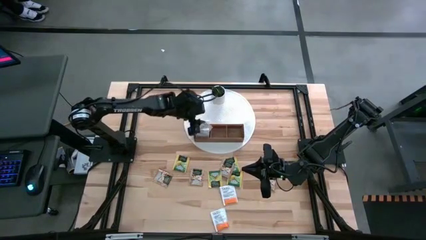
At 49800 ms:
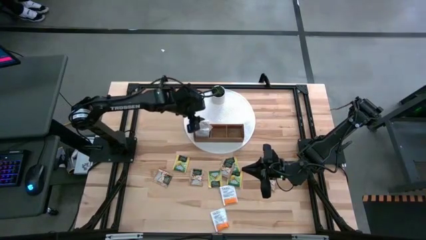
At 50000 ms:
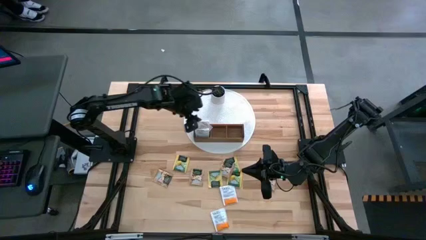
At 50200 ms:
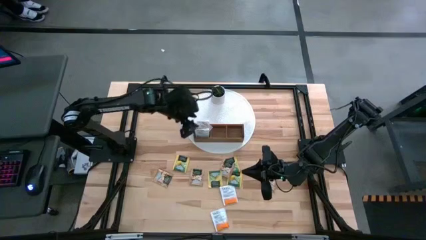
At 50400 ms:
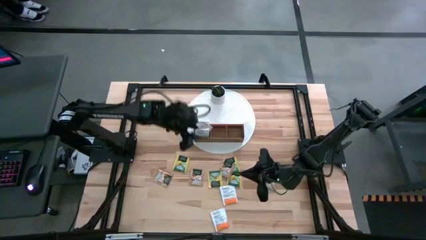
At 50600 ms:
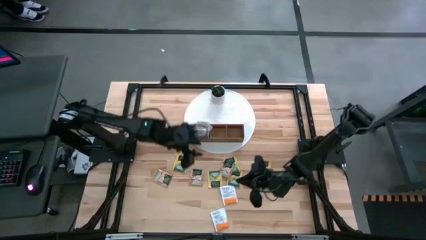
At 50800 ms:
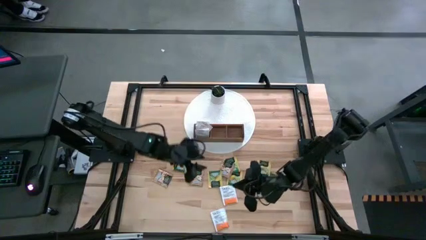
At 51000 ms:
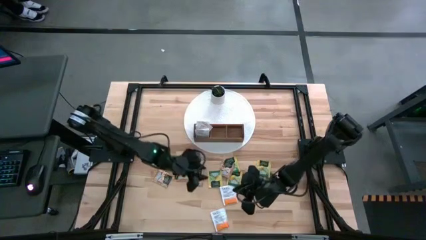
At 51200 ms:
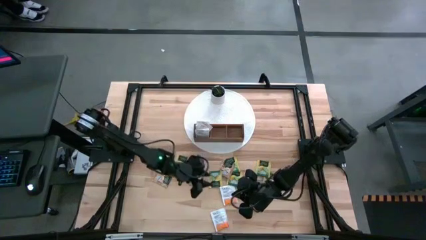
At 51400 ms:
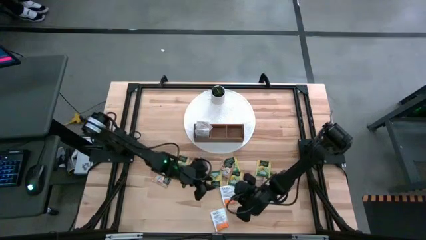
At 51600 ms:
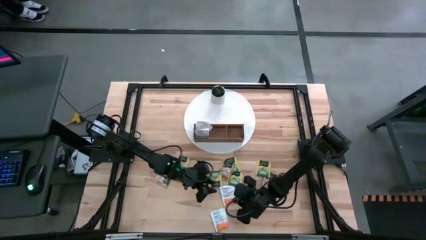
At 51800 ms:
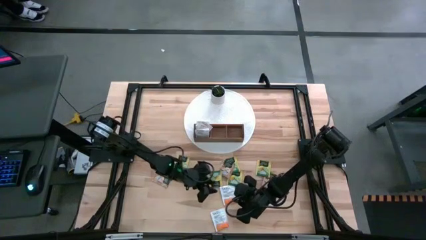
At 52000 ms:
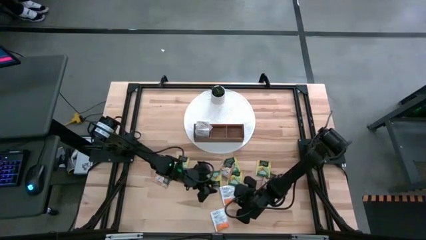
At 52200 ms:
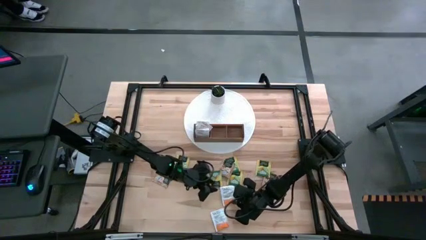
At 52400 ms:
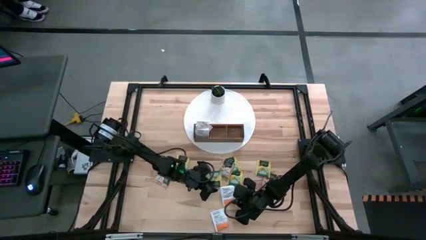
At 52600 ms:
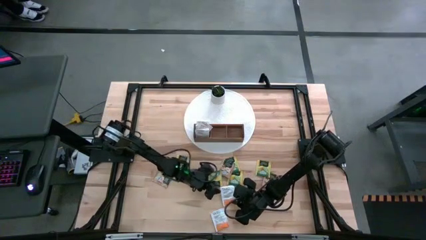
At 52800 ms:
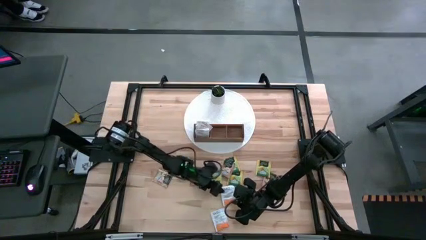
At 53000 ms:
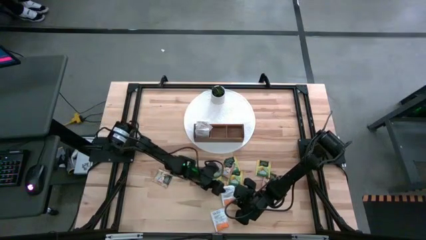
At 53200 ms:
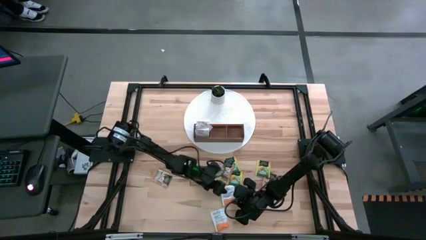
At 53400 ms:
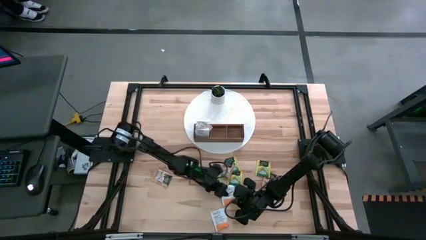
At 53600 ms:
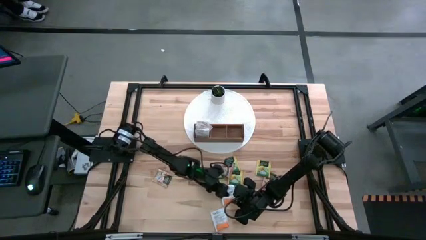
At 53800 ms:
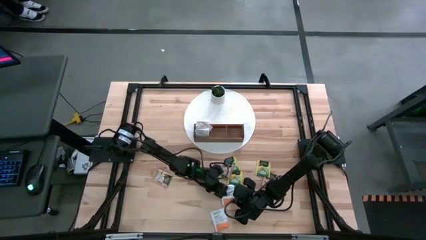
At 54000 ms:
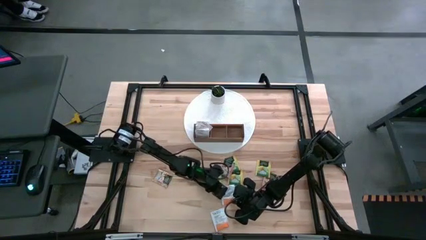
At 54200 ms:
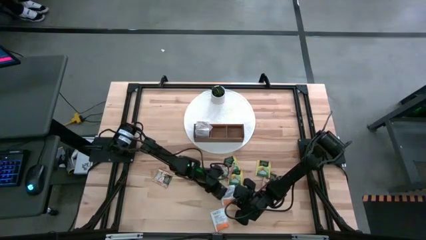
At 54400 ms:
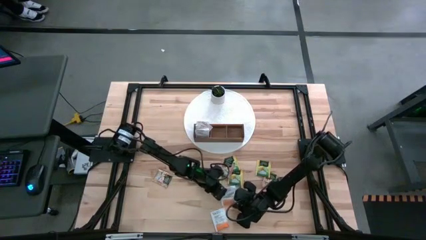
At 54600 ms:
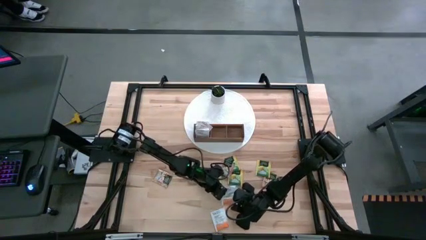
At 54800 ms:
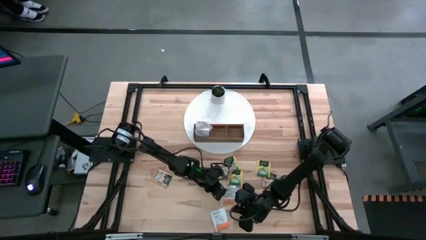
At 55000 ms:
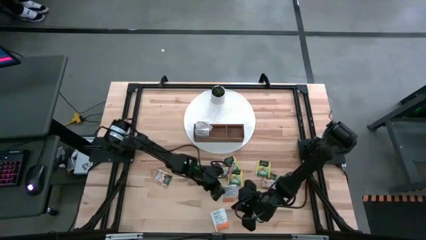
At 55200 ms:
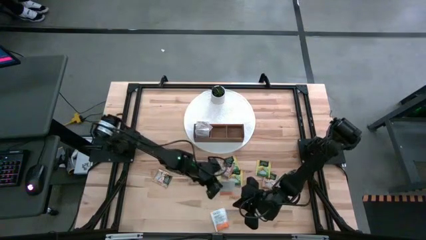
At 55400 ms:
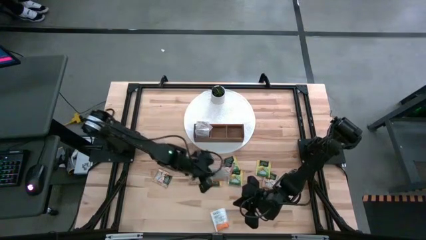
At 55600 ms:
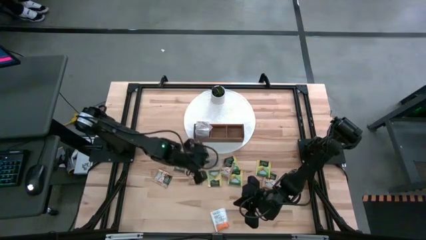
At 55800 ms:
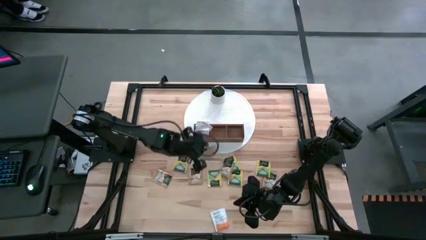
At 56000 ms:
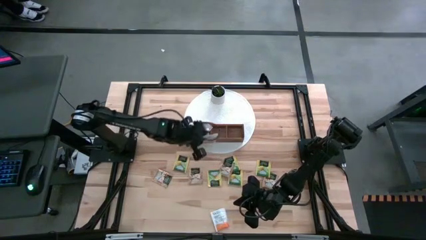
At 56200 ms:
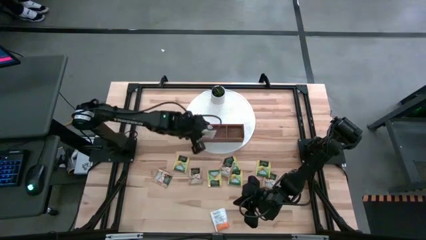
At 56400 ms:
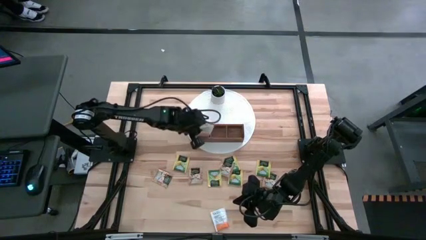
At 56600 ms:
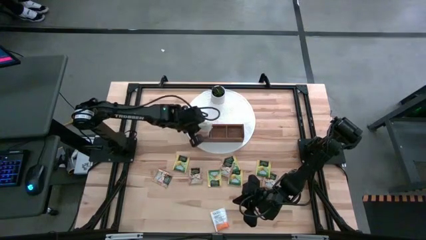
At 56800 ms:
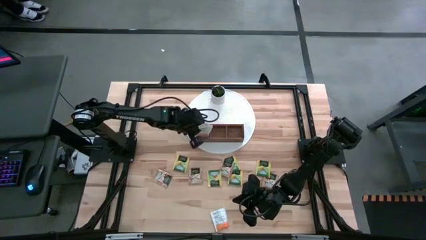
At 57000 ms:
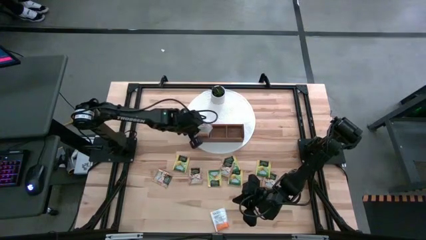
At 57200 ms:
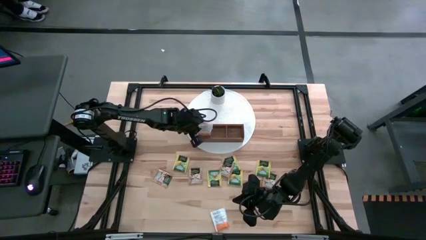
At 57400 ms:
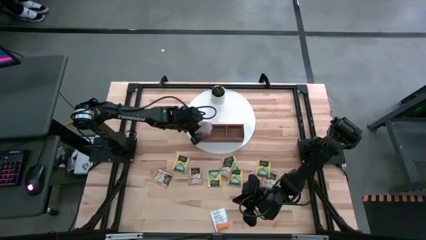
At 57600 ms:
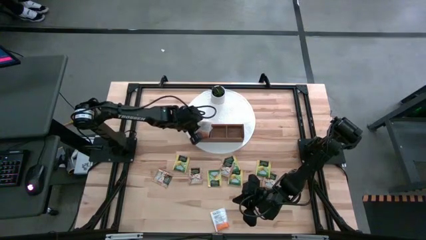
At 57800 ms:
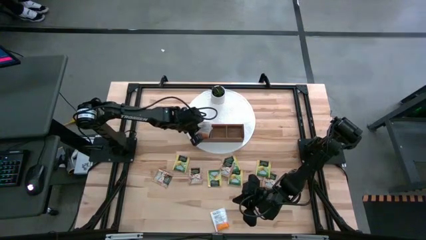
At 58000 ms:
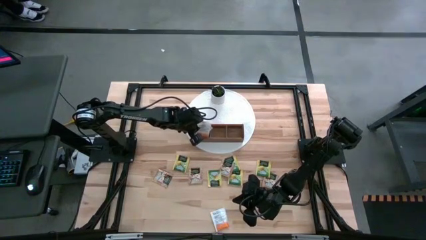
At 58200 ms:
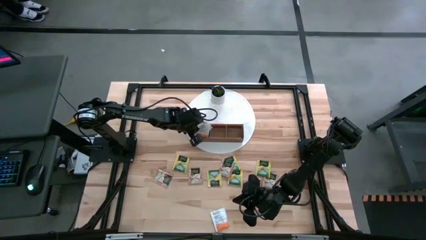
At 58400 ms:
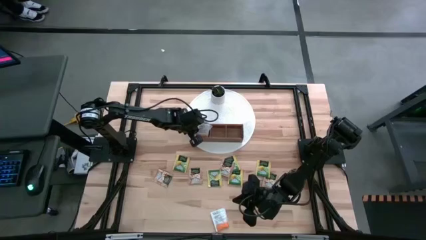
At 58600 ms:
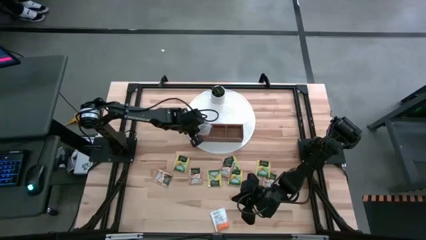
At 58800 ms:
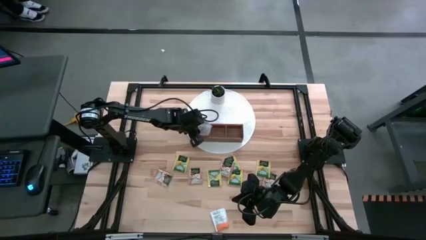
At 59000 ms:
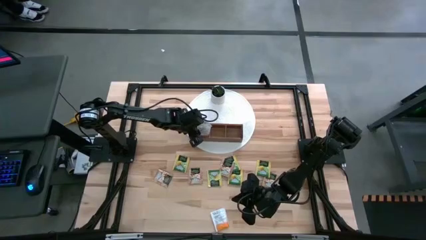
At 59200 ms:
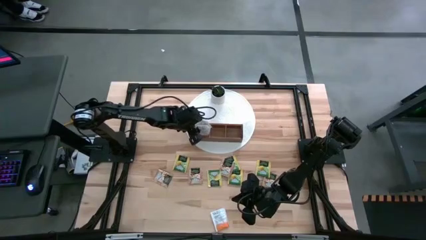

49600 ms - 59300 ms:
Task: Pick & Place Tea
Put the white tea bag into the left section of the wooden organizer

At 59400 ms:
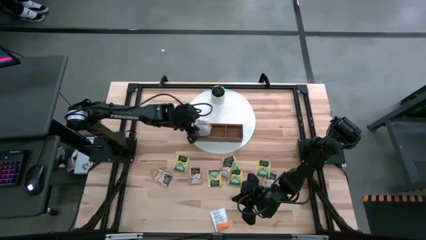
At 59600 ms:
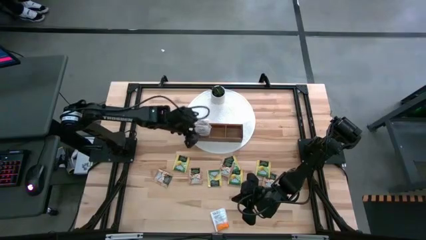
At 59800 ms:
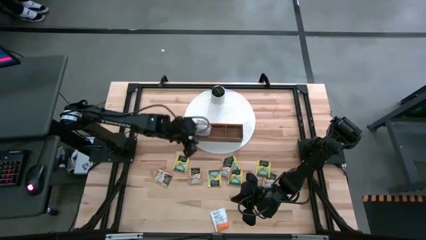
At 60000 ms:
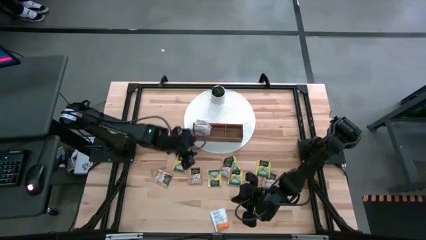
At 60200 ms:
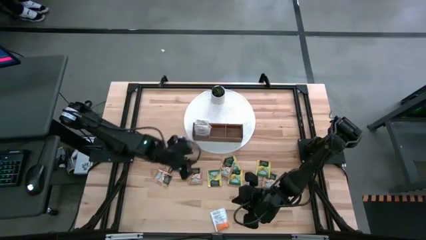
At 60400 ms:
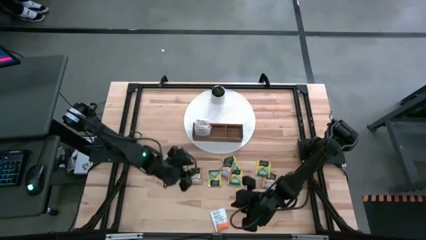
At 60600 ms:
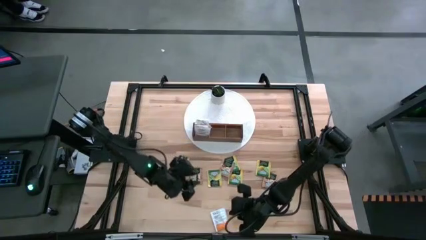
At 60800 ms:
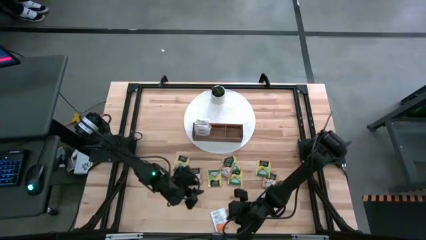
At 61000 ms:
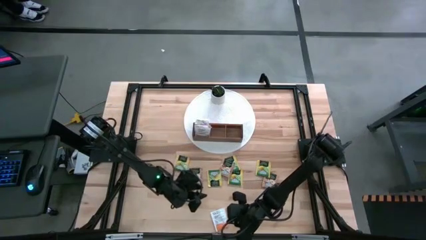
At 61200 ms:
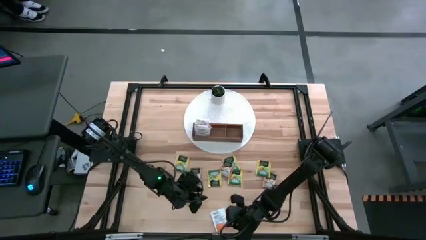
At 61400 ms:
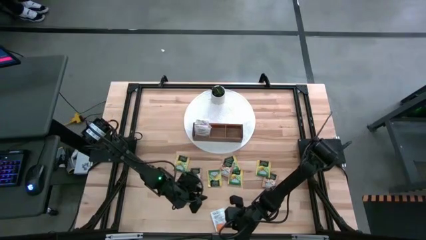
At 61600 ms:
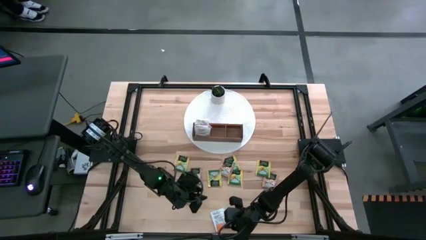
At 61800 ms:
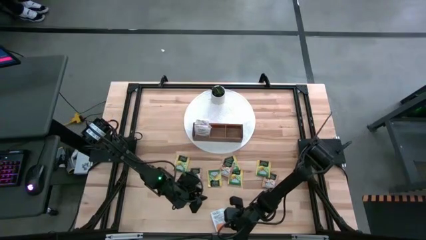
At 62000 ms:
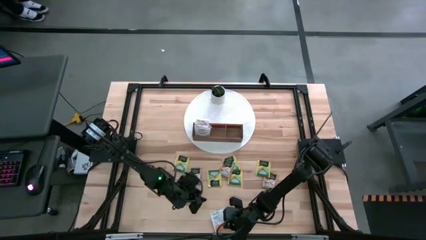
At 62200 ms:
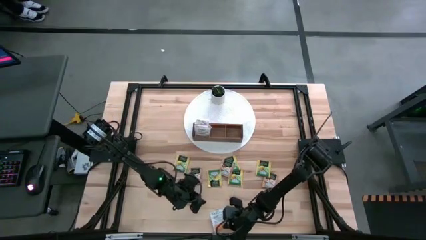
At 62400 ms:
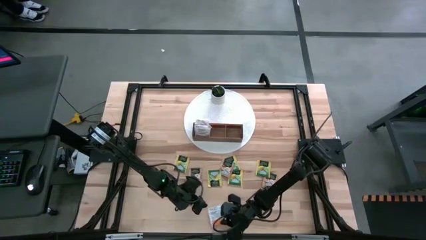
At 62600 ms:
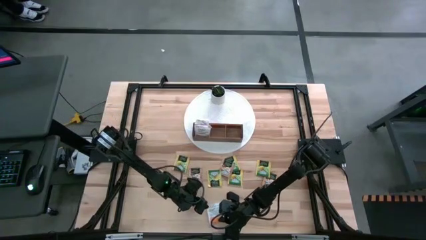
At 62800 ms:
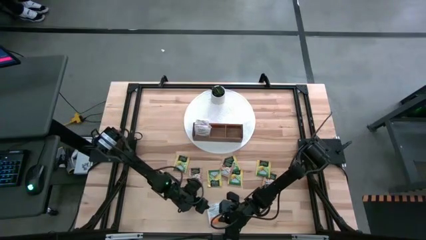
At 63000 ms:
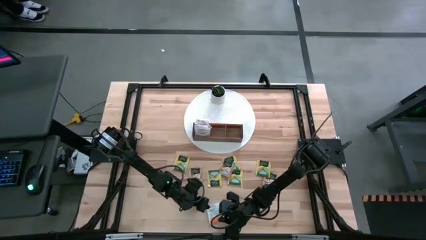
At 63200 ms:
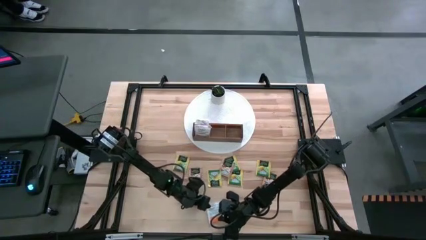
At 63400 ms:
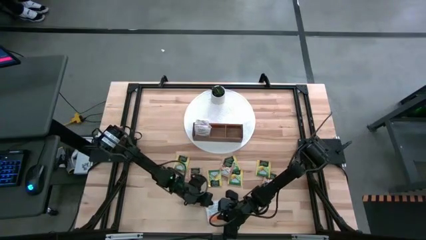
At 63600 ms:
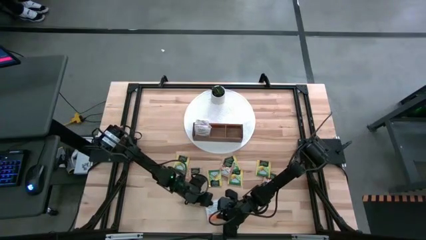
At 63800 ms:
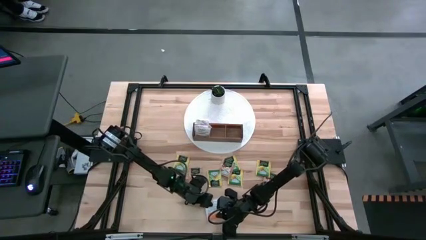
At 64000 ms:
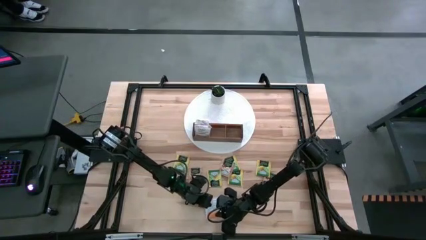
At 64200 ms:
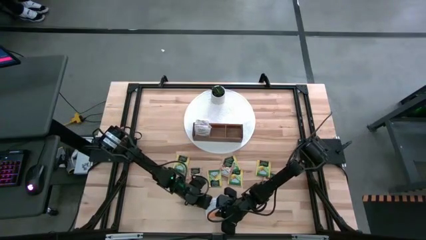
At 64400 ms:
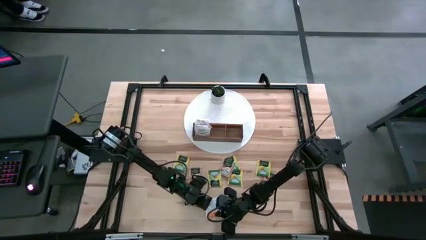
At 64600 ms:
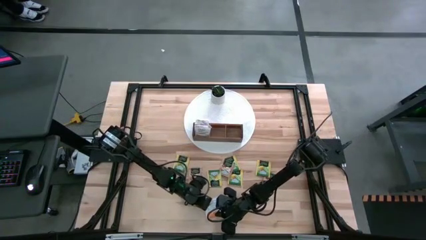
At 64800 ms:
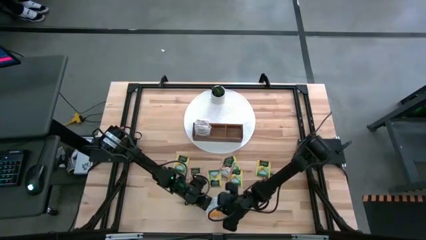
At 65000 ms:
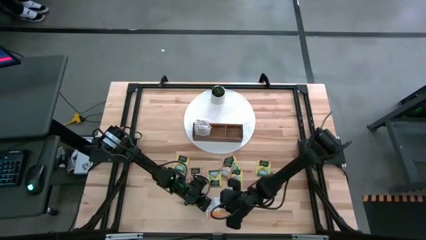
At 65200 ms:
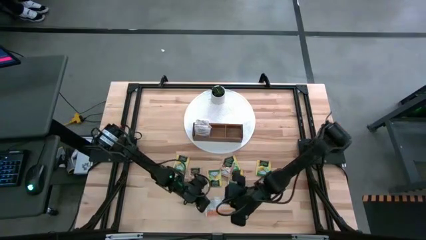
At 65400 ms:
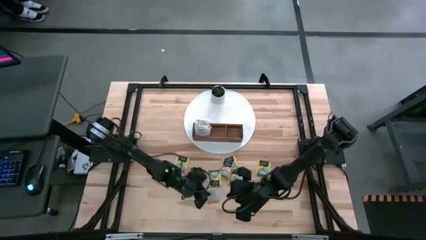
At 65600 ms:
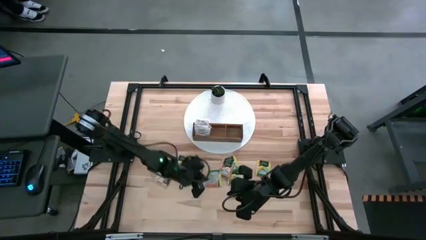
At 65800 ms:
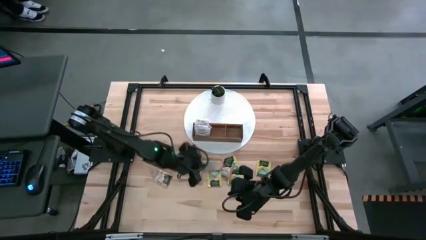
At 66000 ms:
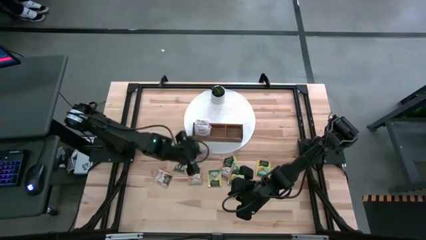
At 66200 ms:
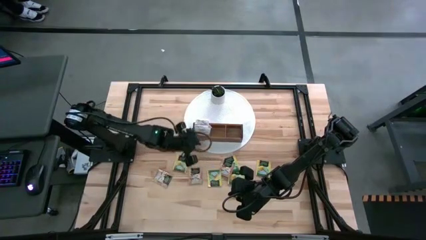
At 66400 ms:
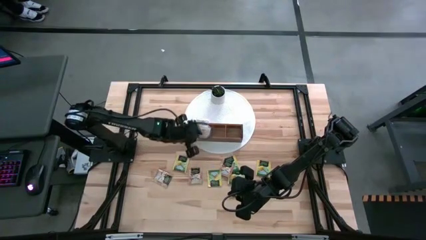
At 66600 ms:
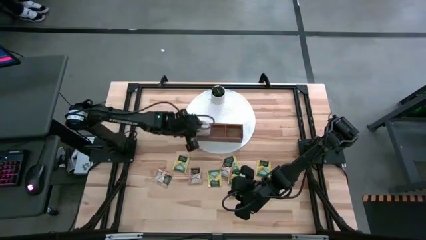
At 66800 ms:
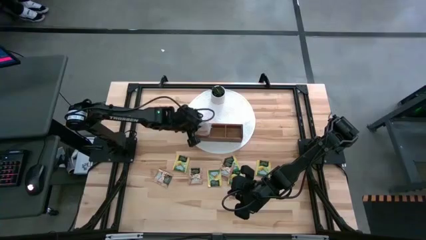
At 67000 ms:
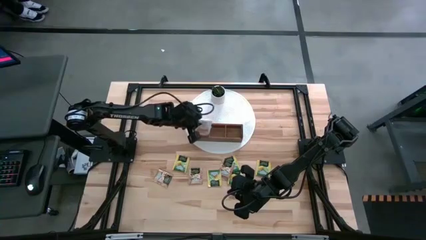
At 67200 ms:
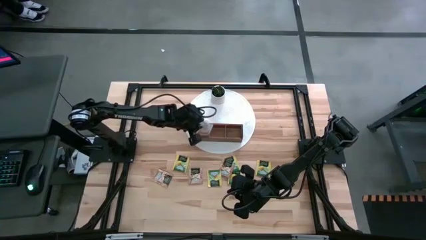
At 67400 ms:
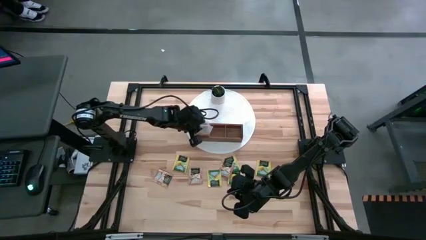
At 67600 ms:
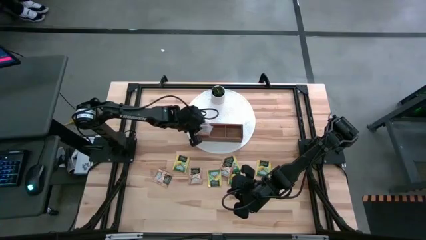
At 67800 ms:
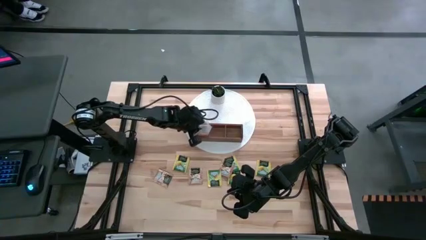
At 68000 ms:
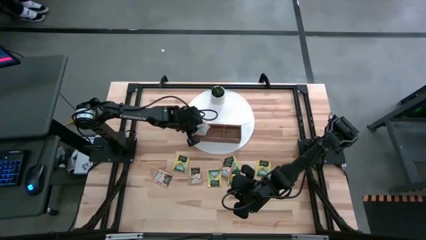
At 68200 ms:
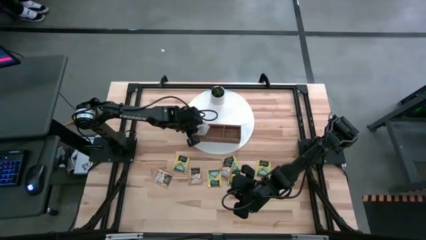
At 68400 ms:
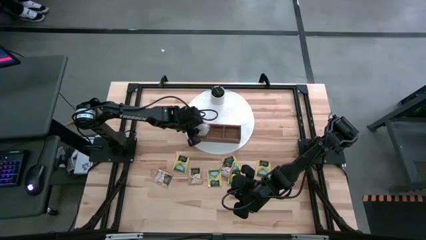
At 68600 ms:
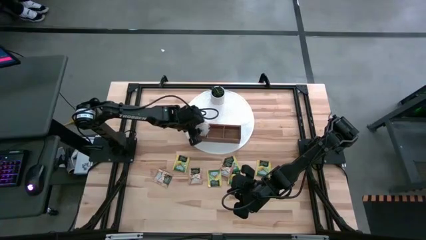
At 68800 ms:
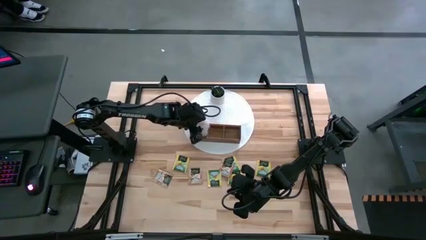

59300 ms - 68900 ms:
Put the white tea bag into the left section of the wooden organizer
